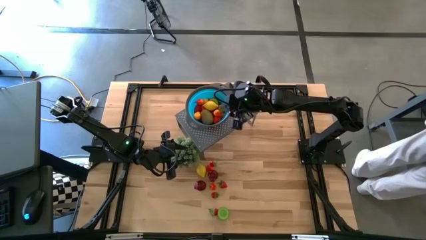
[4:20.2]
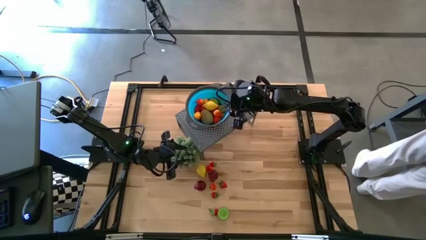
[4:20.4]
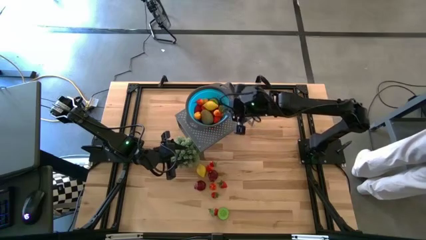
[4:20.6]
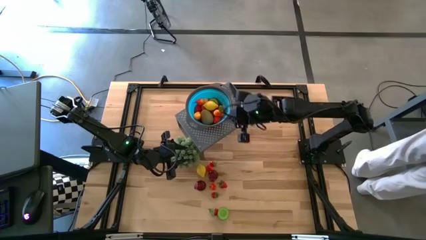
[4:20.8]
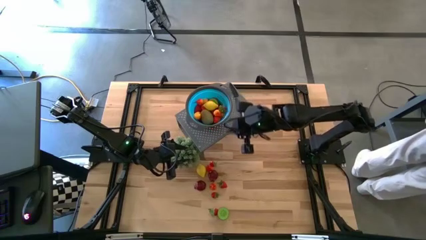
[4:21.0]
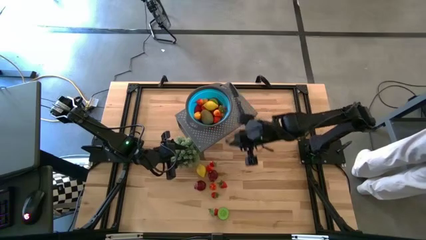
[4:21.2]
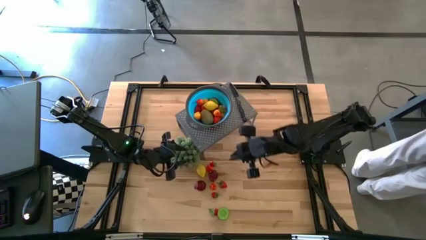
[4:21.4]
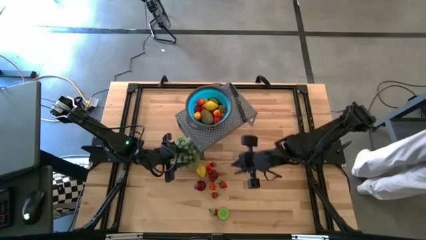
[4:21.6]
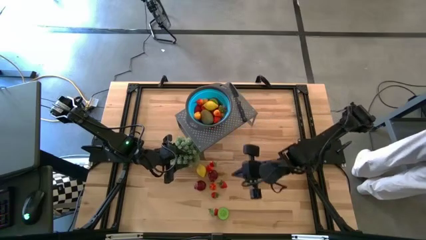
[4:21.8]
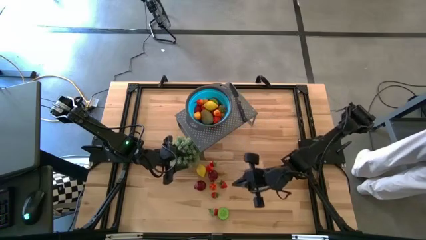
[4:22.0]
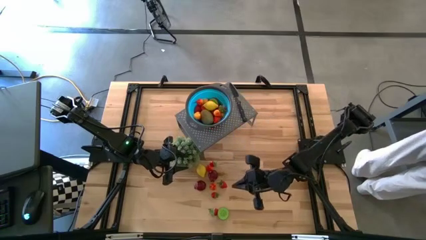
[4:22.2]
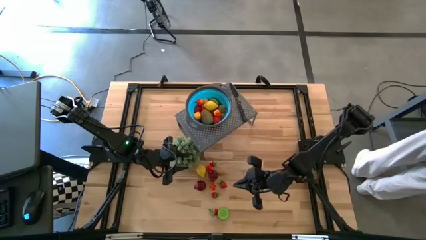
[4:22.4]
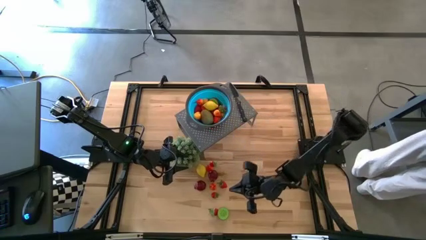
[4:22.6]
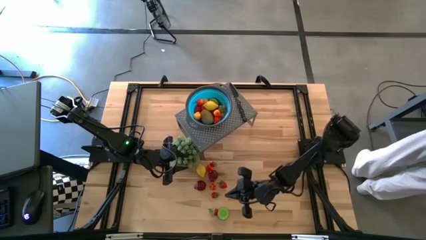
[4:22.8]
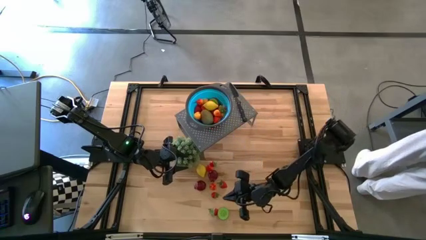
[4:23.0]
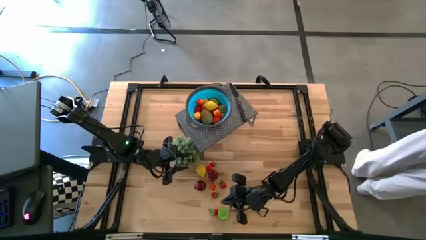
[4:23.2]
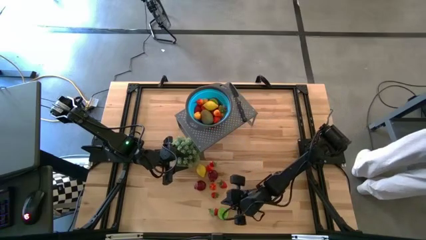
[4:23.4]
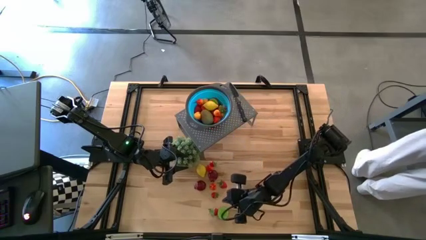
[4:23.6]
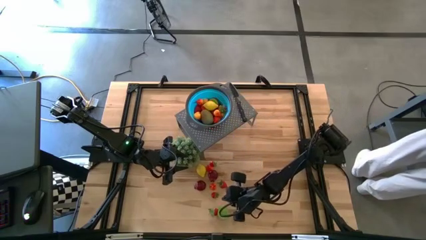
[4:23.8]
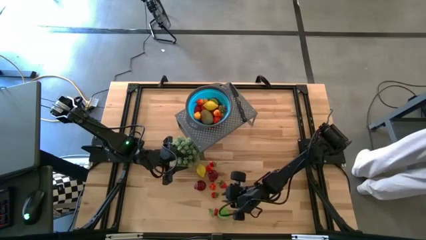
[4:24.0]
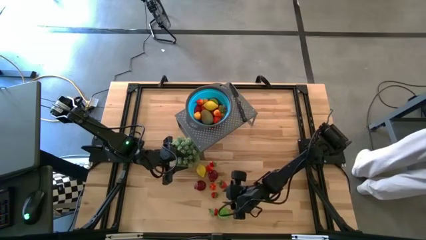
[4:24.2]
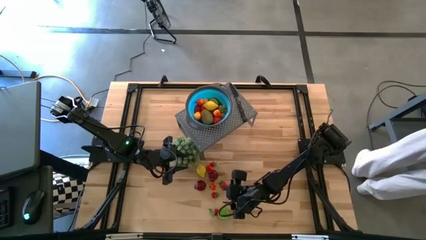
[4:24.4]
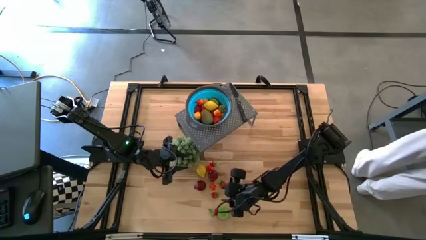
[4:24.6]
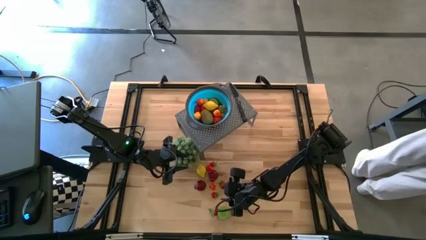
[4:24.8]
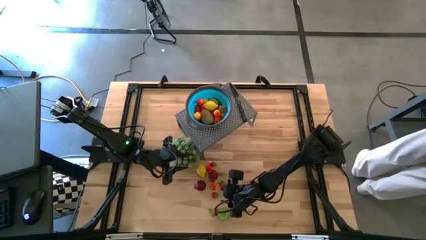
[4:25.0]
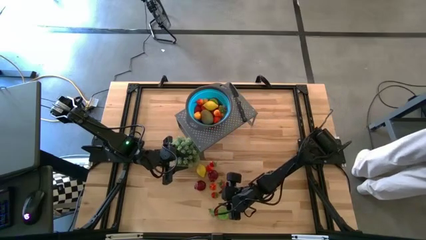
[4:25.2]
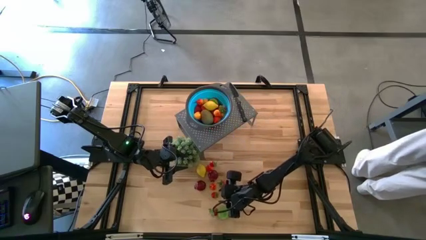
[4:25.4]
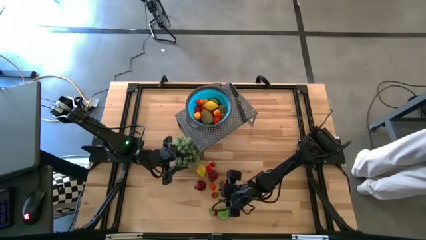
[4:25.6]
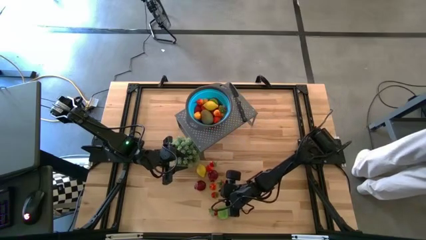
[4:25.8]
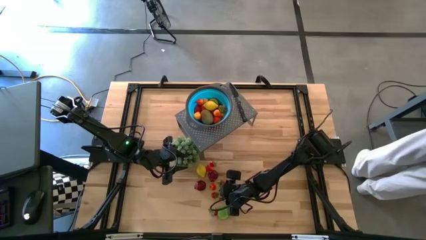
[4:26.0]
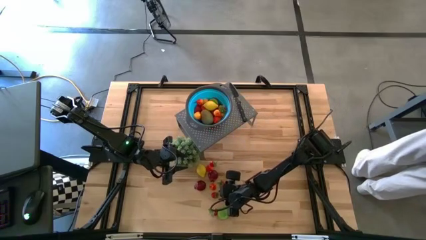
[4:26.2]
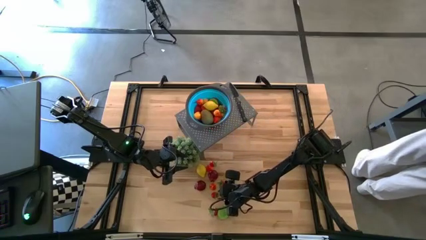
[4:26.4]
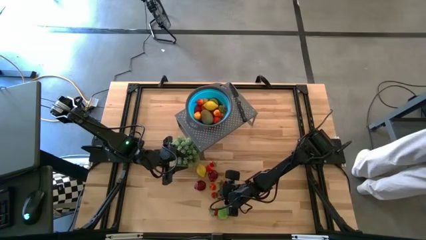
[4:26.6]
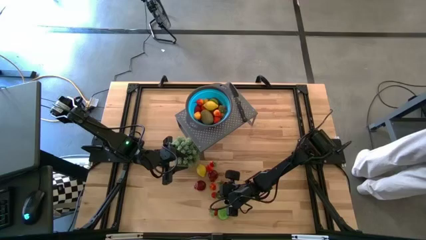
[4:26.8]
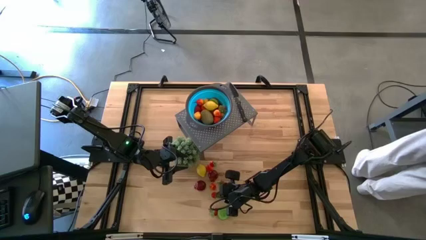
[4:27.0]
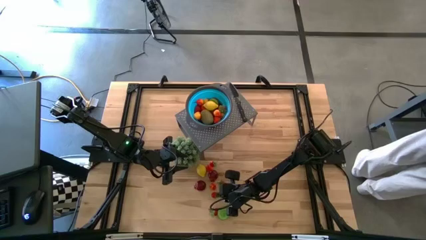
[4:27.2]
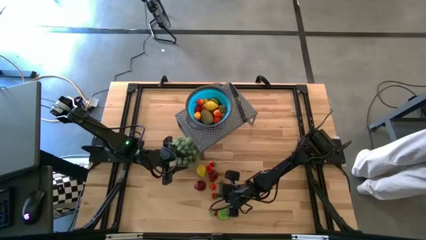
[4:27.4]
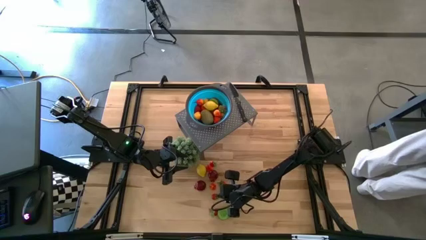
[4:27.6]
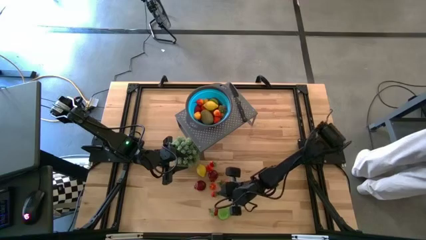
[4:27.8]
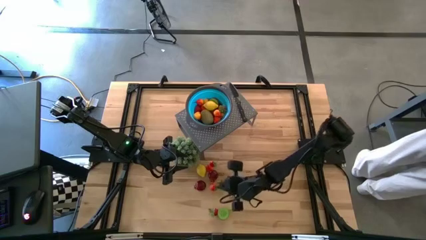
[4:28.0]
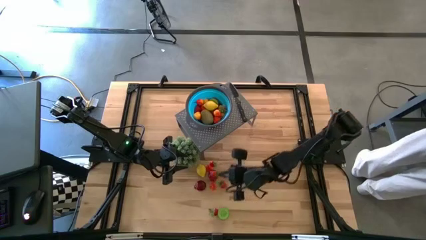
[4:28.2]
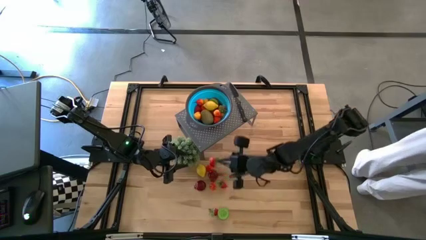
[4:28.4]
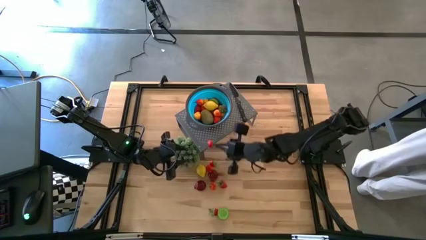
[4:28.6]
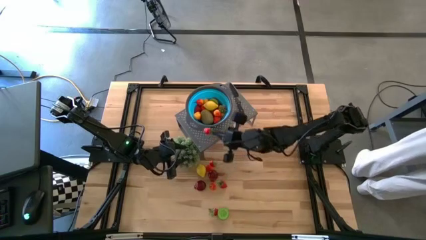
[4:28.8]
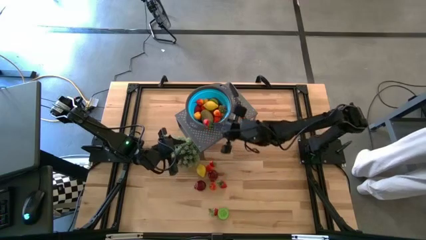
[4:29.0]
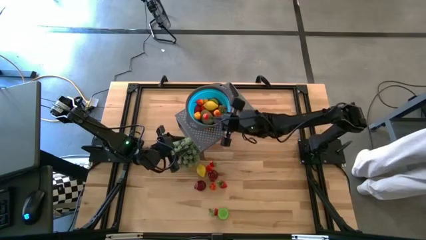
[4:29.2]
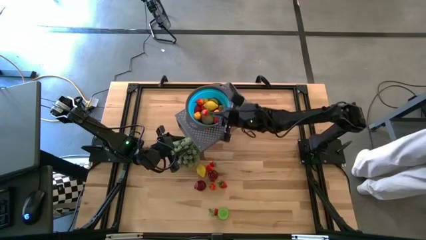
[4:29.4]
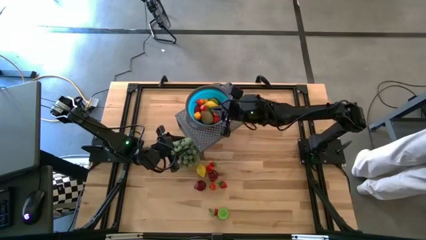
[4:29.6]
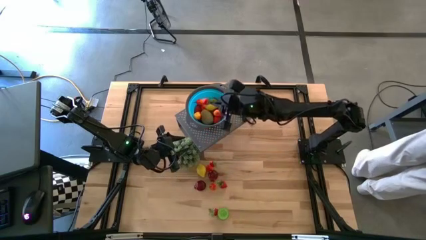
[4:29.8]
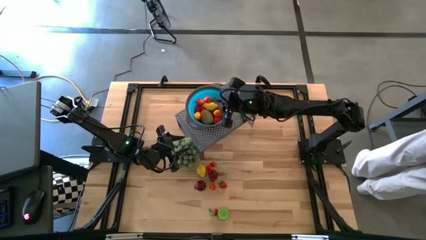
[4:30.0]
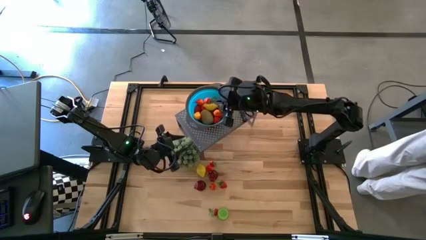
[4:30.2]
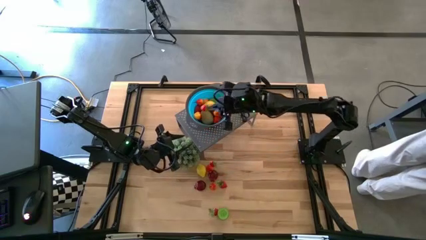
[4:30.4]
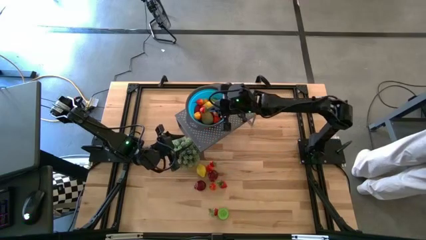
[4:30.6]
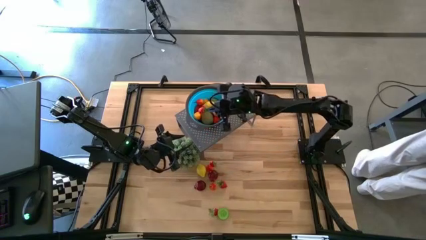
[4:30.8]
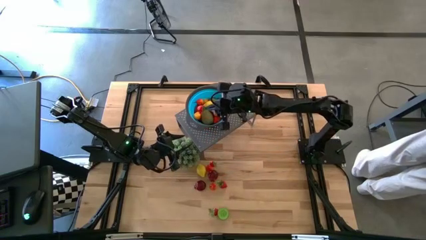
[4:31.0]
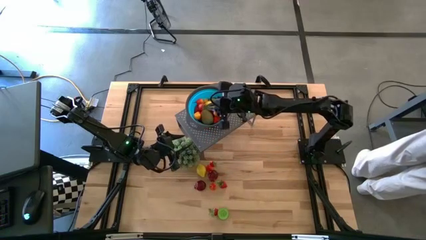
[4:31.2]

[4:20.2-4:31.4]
Task: Pick & Place Fruit
Put the strawberry into the blue strainer bowl on the shelf
